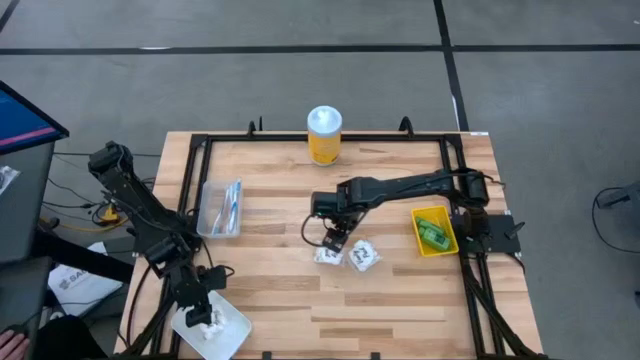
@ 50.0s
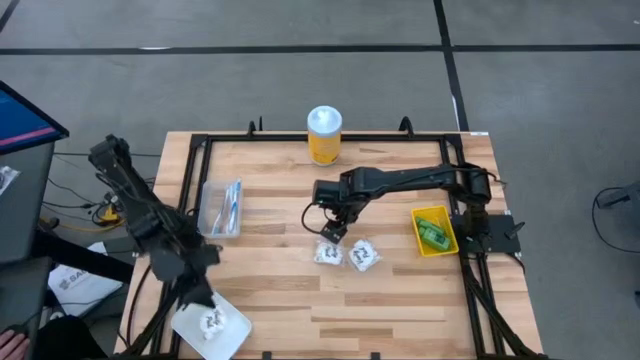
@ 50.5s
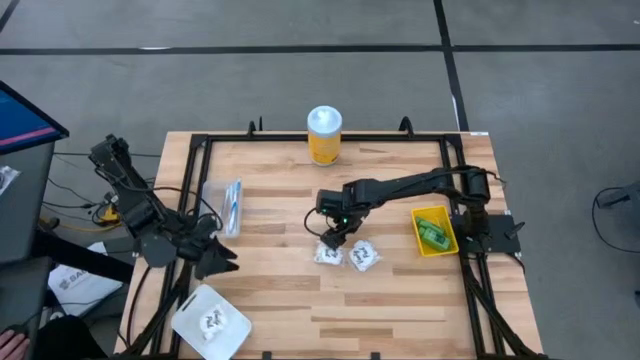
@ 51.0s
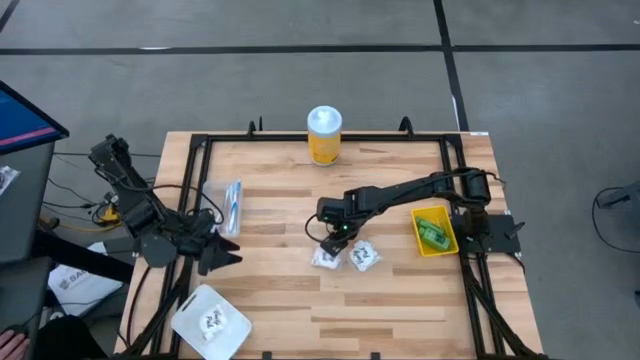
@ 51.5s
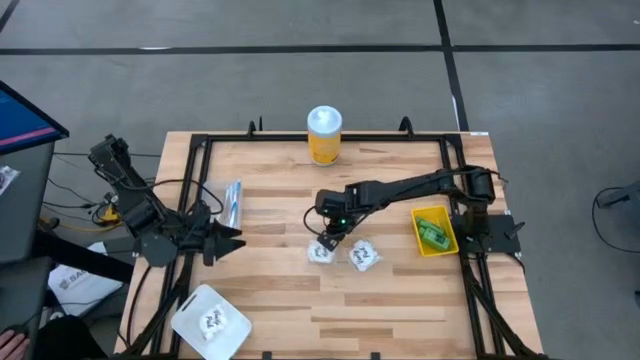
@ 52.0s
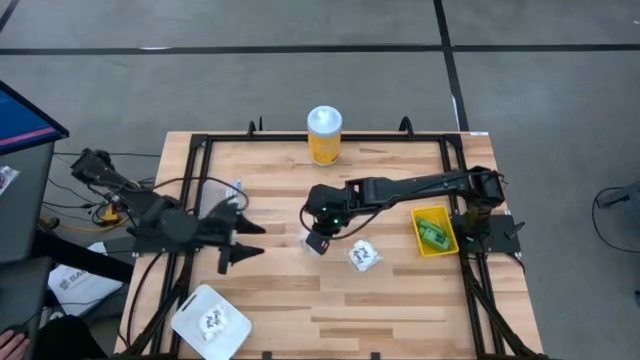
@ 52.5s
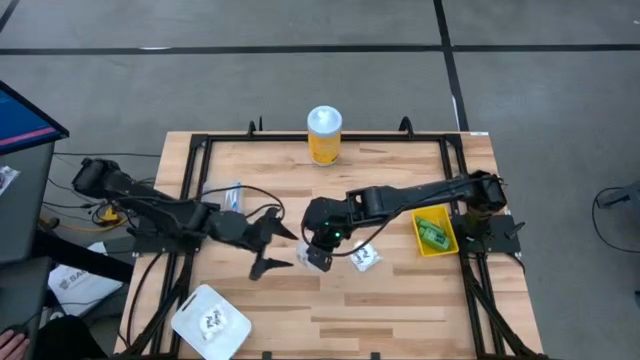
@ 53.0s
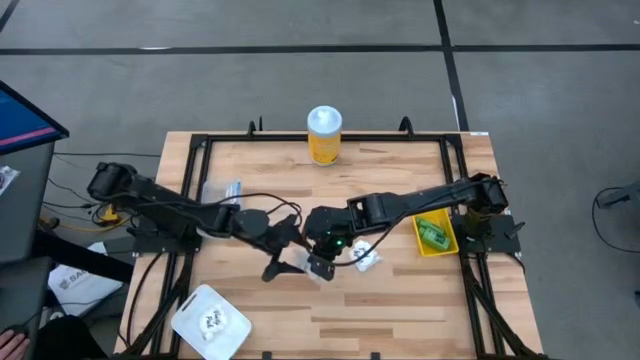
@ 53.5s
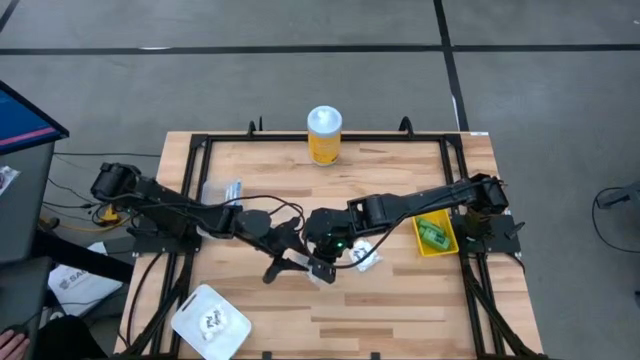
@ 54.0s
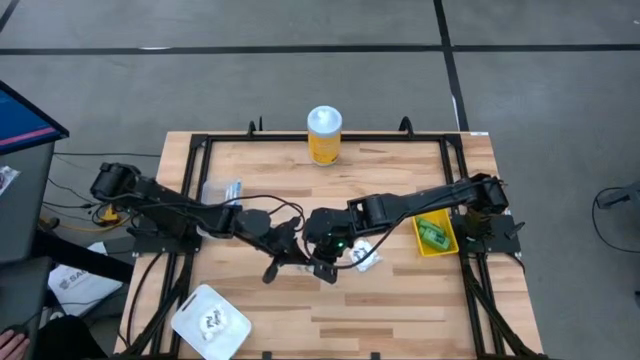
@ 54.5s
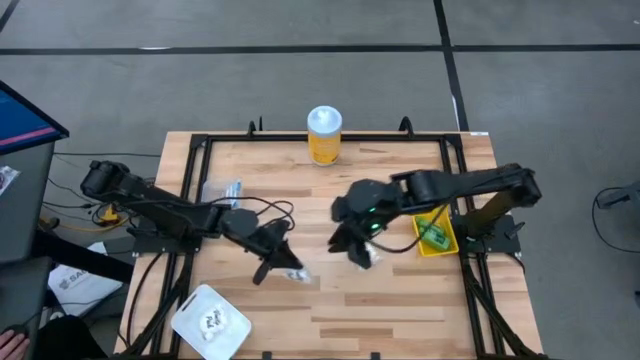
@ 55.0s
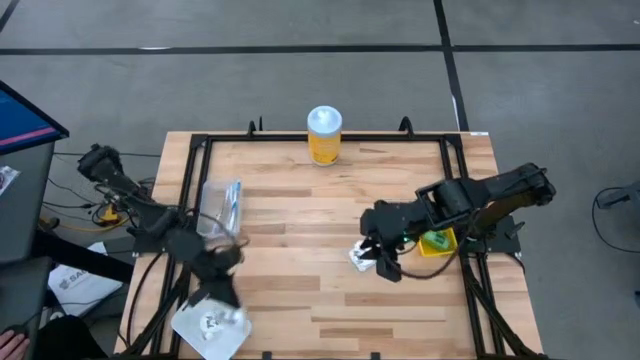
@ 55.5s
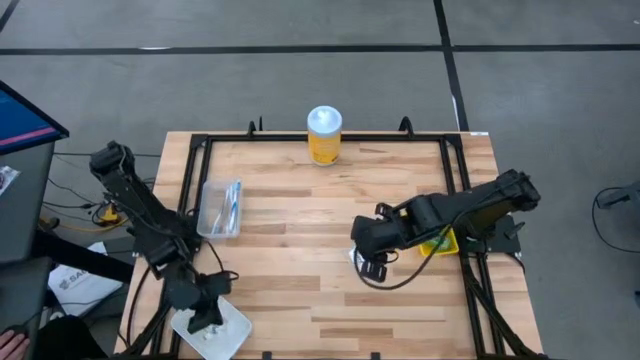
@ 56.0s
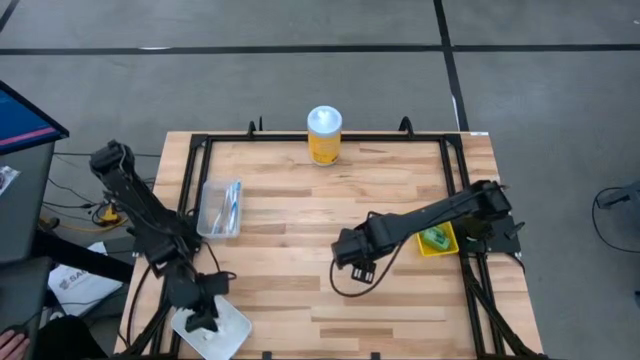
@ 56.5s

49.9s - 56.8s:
Task: Pick & Place Travel size toiletries
Put the left white cotton pack into the white bin

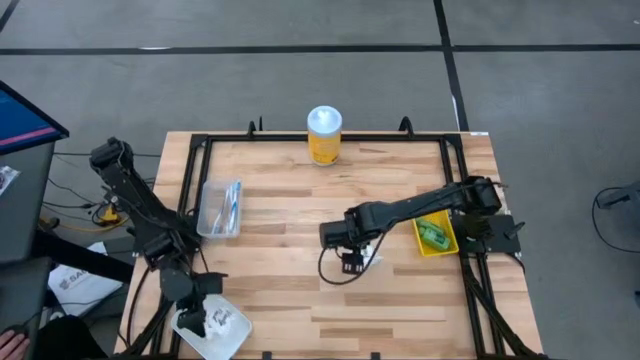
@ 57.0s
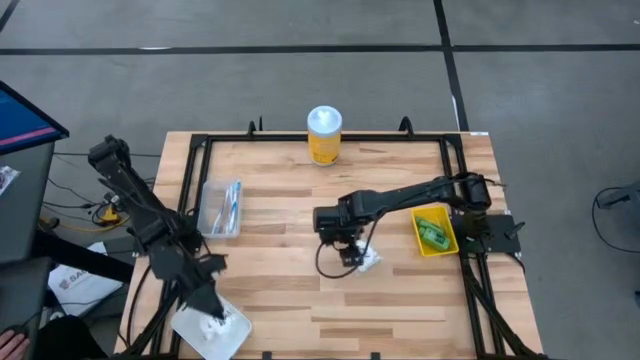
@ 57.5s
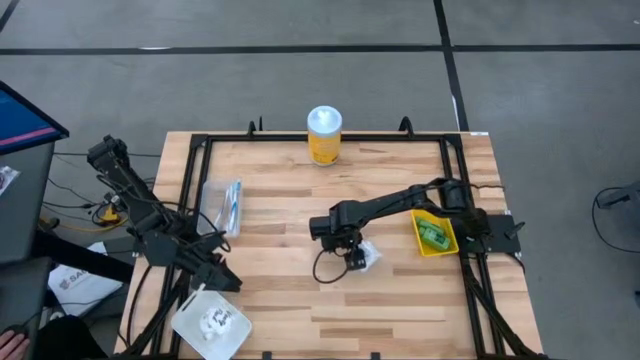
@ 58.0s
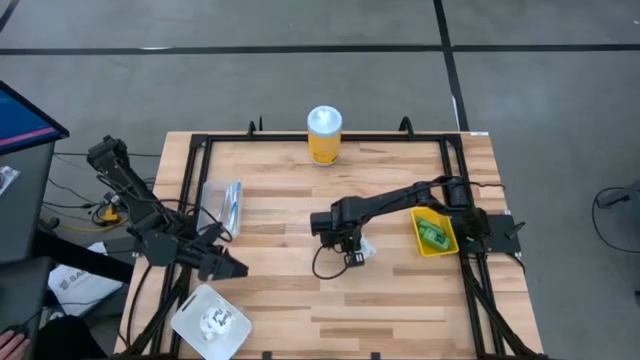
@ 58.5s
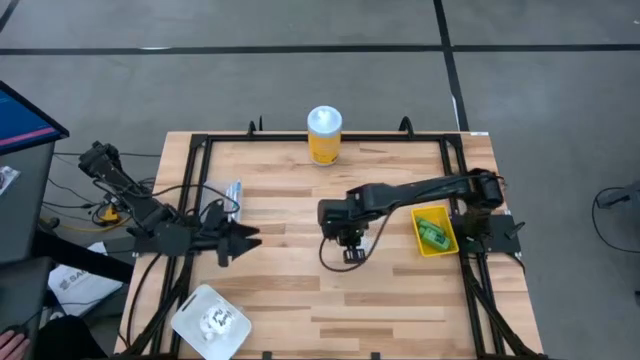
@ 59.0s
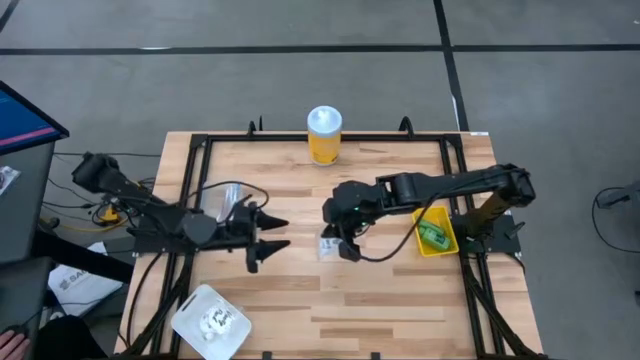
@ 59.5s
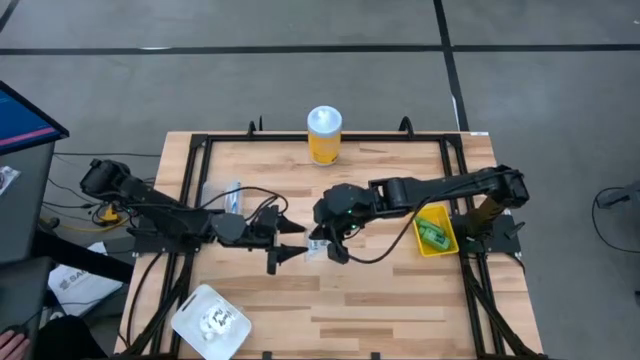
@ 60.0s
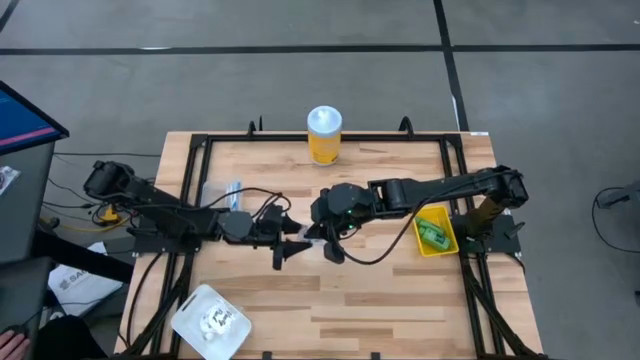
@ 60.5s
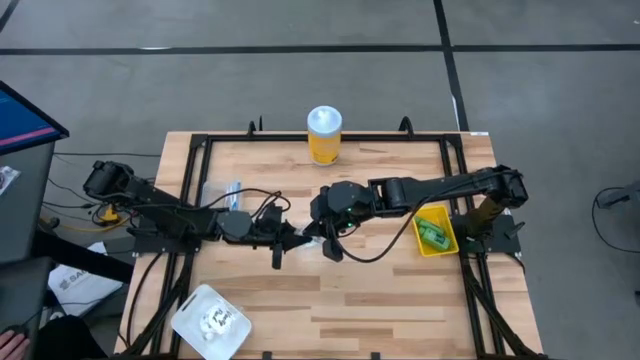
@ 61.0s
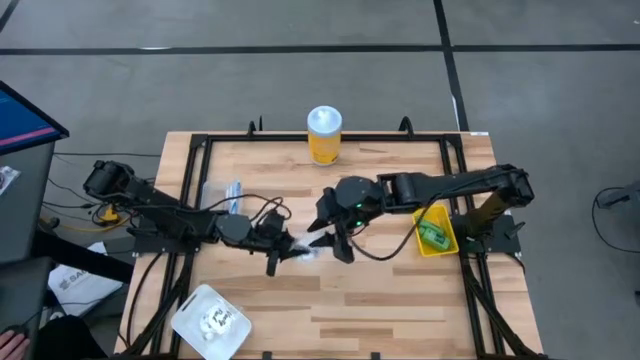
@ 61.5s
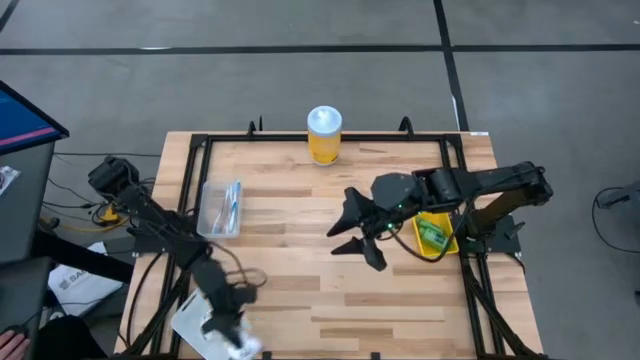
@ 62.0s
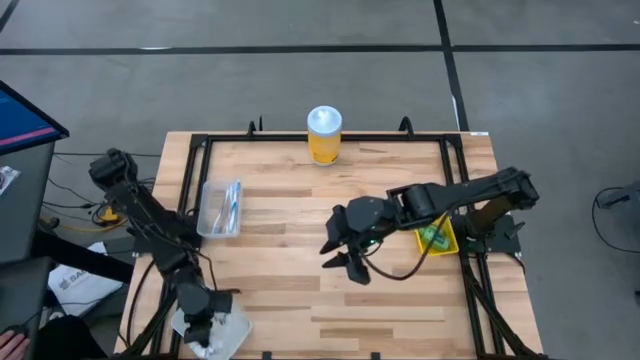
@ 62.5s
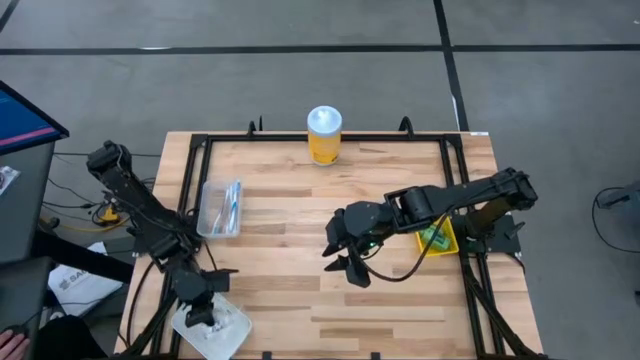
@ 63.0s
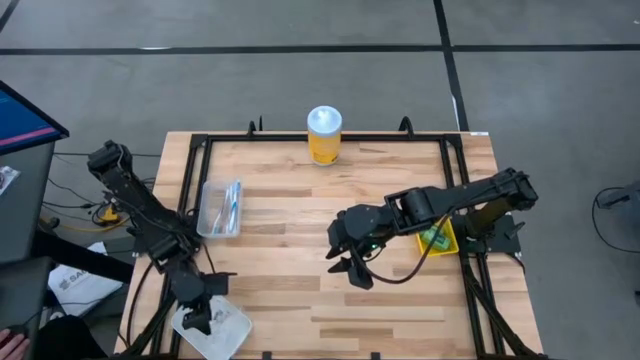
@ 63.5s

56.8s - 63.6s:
Put the white cotton pack into the white bin

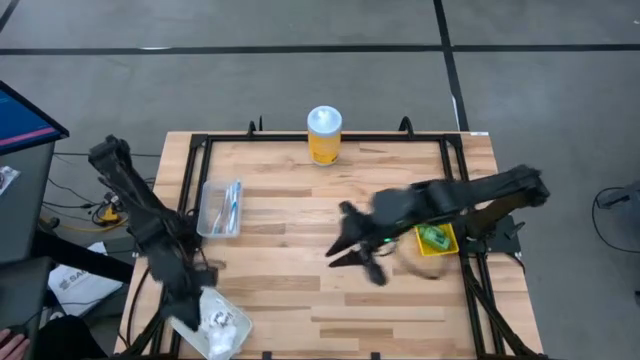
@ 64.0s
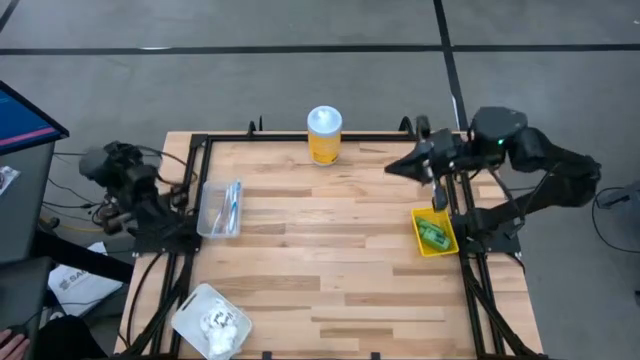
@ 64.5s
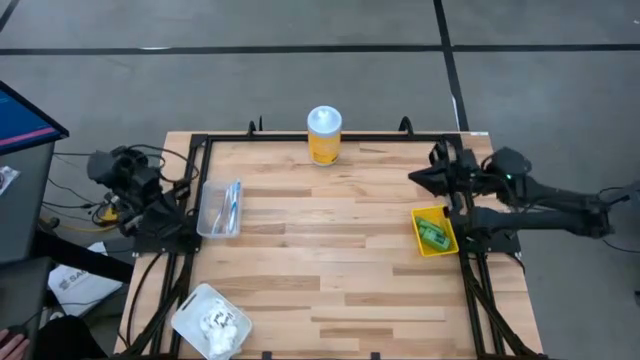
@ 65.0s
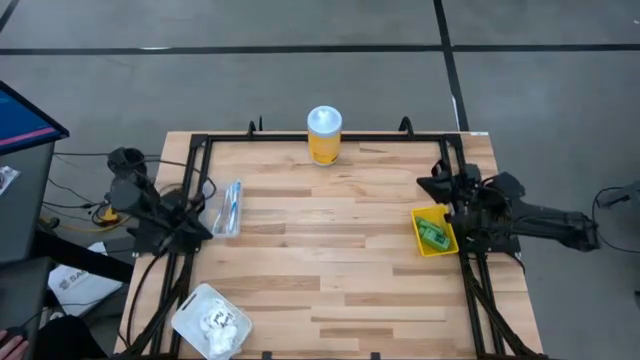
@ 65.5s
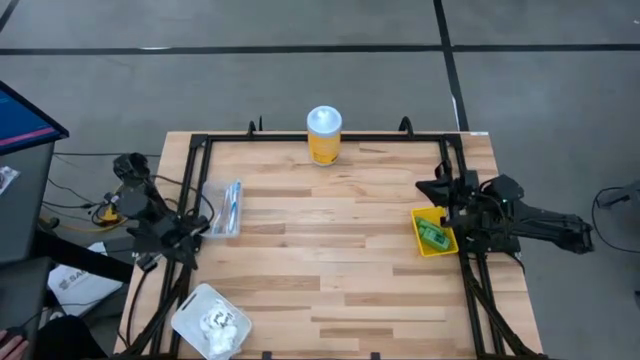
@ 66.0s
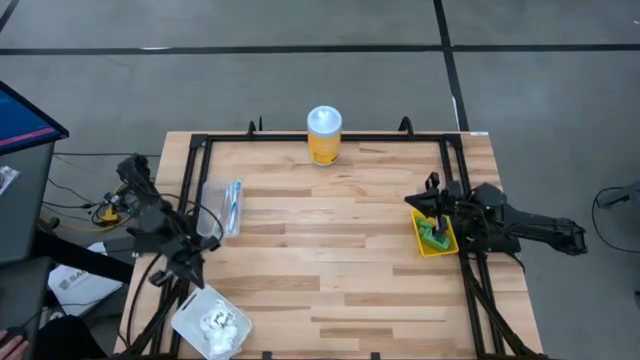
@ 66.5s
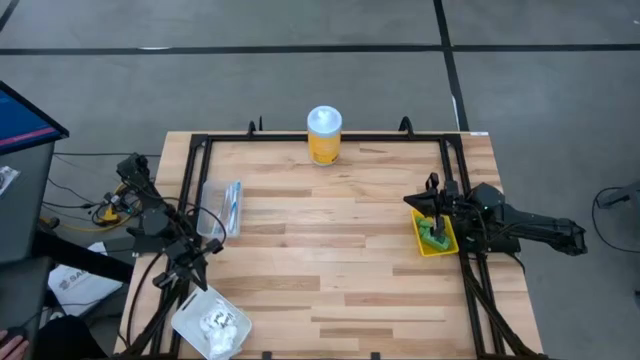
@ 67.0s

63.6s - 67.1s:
Return to Home Position

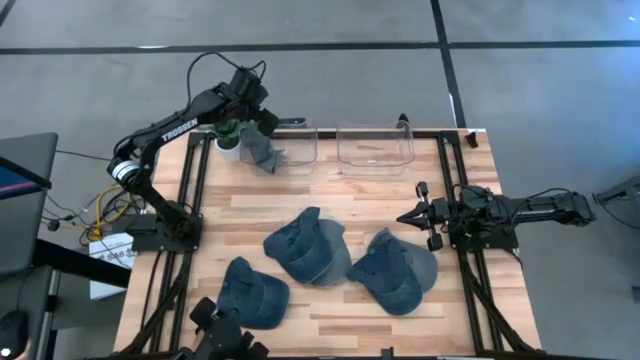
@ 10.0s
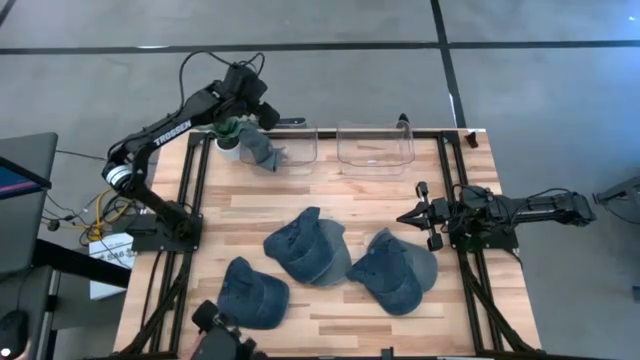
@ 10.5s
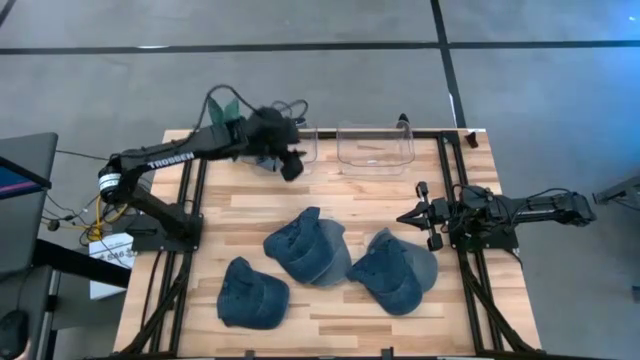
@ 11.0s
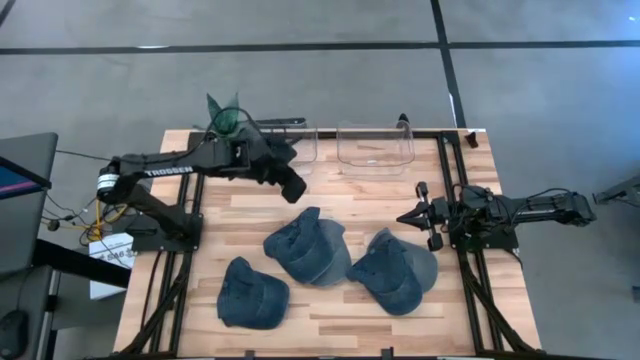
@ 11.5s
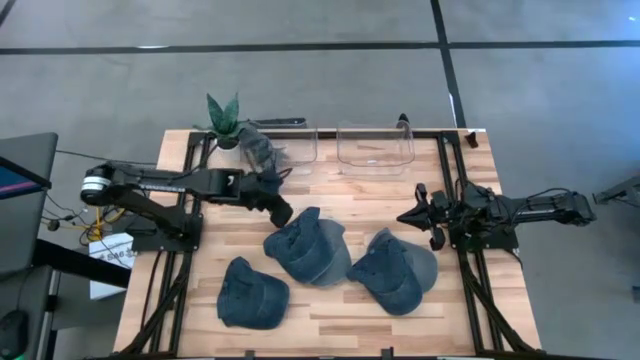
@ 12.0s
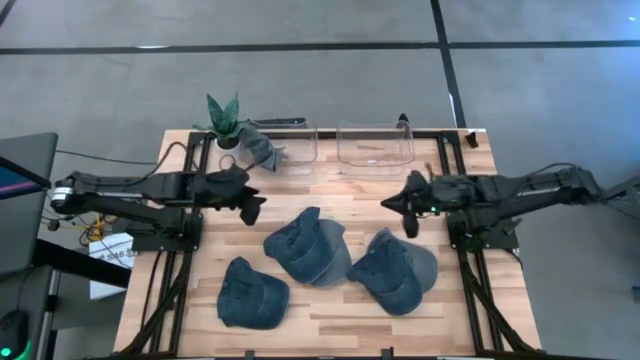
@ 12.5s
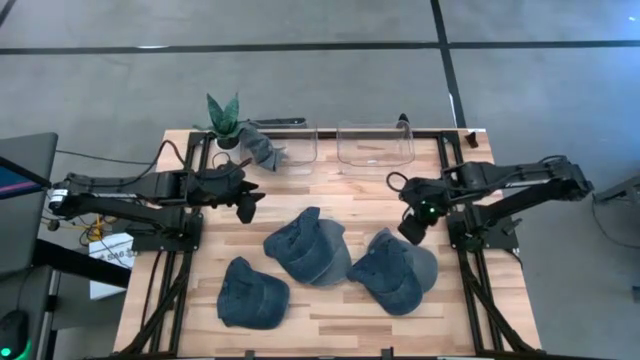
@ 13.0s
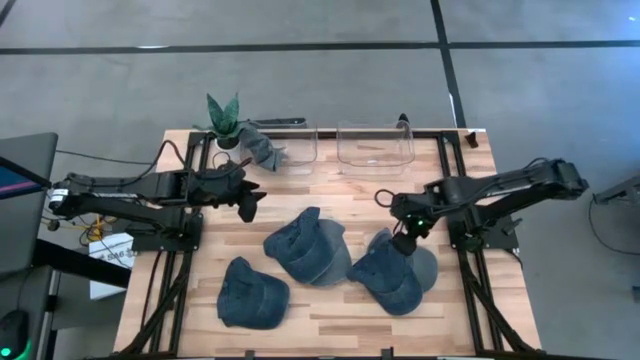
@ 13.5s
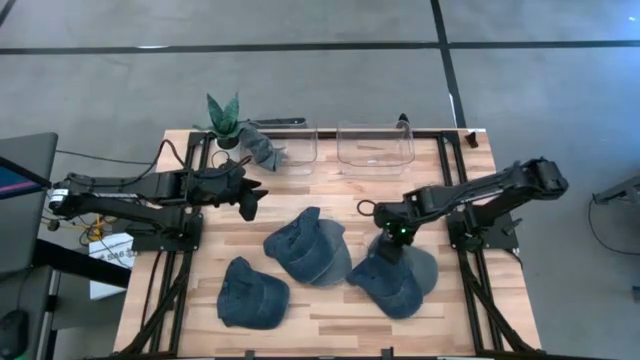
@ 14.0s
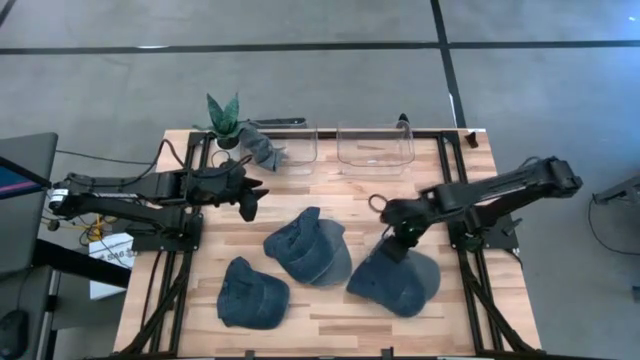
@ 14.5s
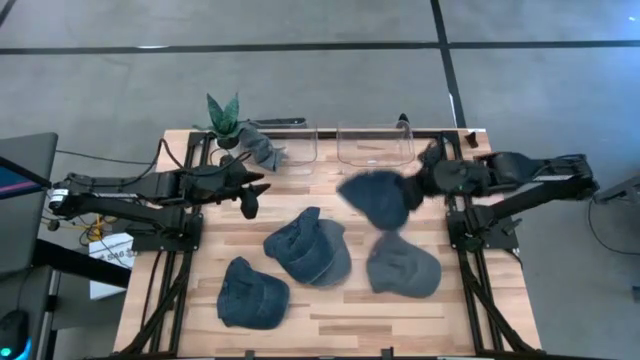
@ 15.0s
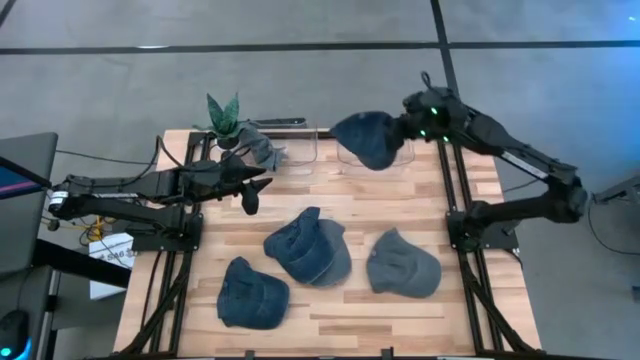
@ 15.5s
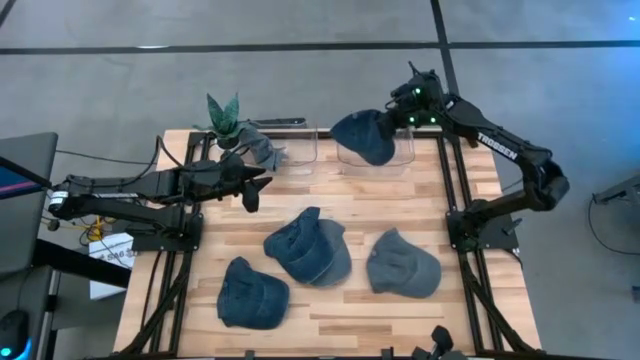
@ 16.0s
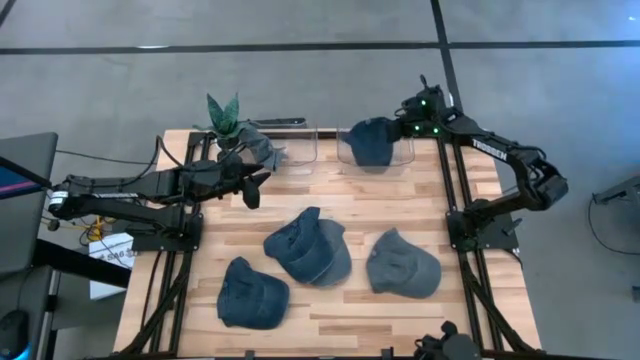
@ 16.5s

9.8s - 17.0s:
Task: Pick & Place hat
Put the bottom right blue cap into the right transparent bin
